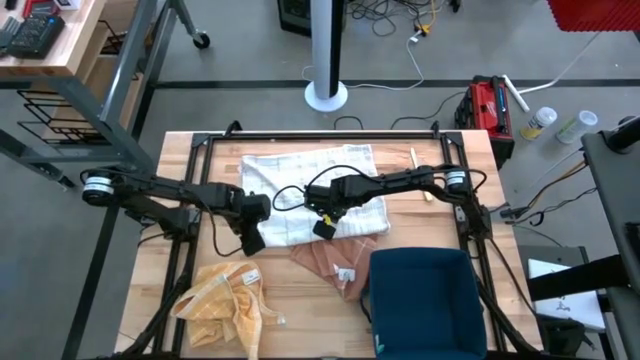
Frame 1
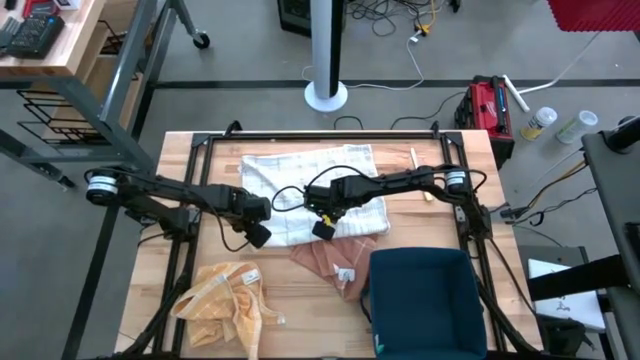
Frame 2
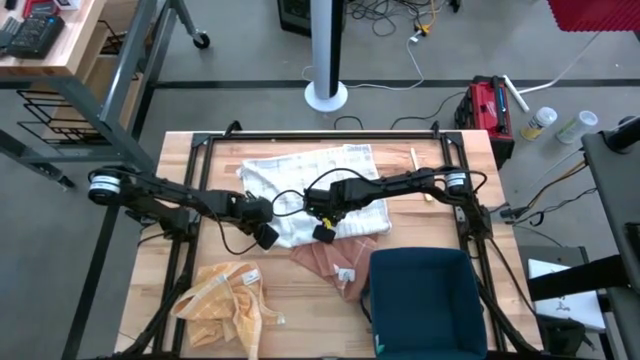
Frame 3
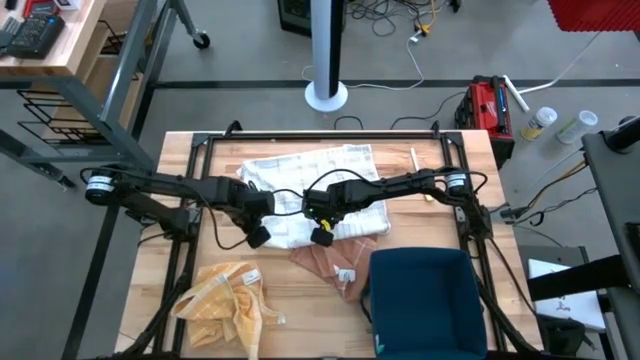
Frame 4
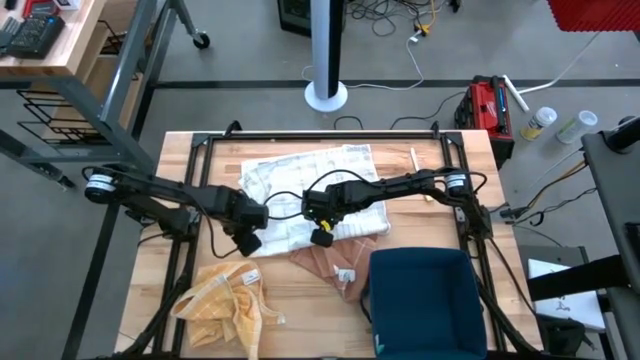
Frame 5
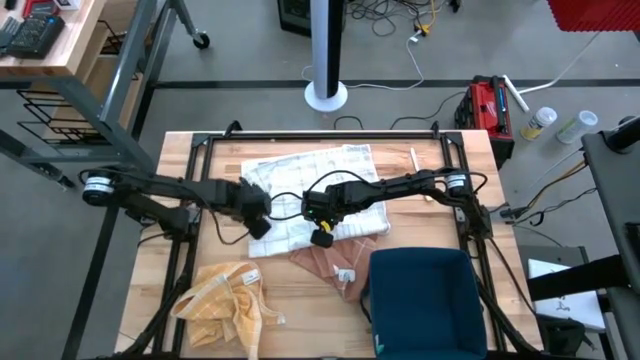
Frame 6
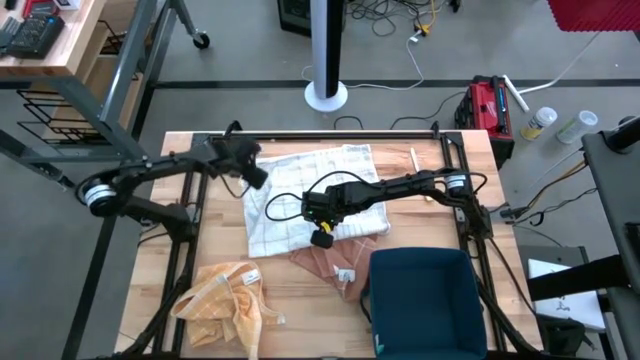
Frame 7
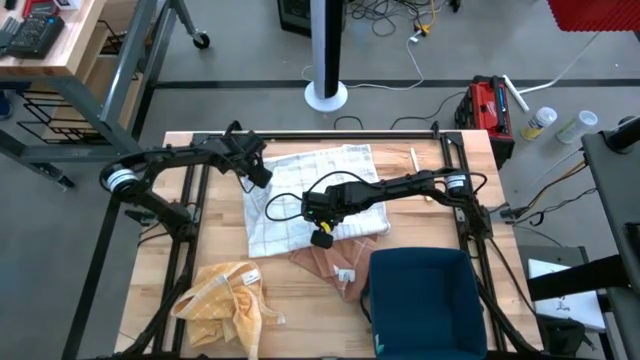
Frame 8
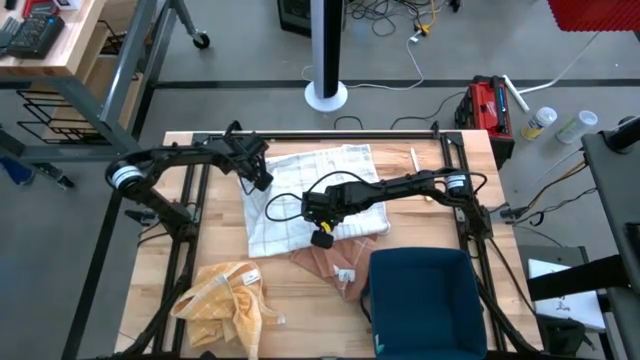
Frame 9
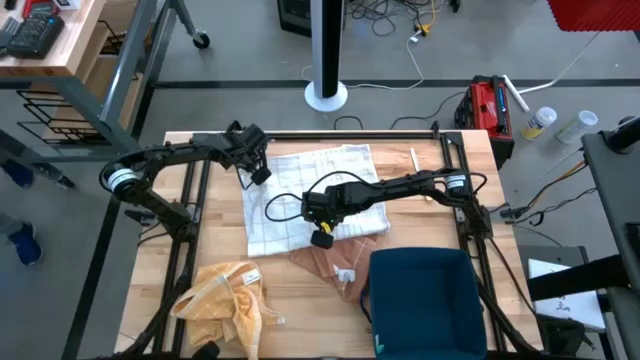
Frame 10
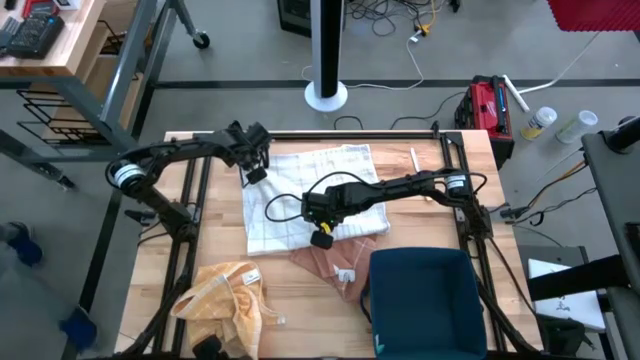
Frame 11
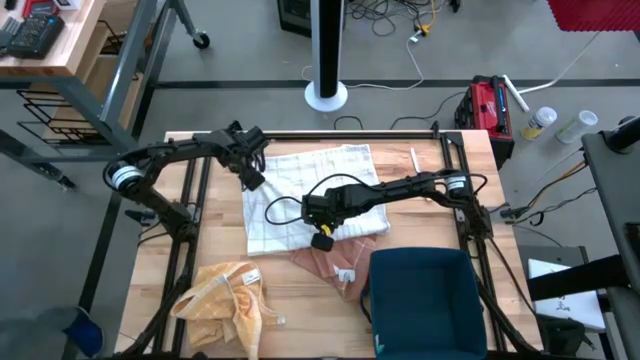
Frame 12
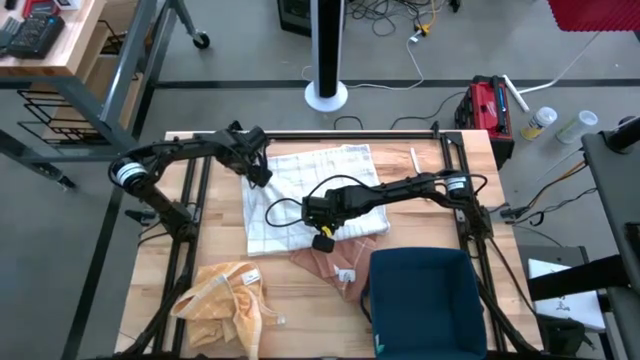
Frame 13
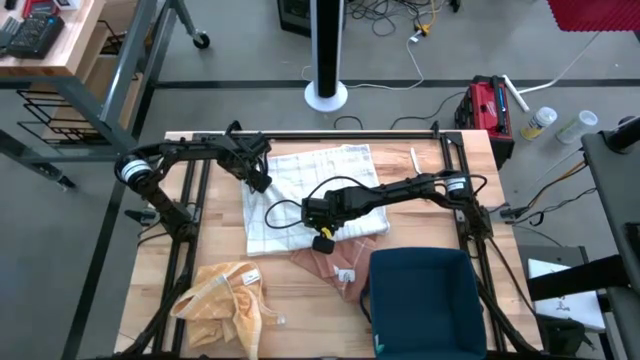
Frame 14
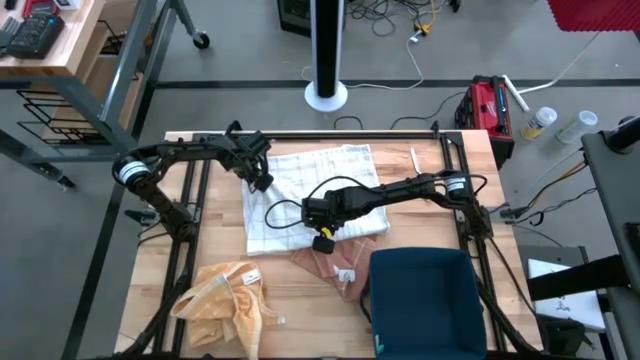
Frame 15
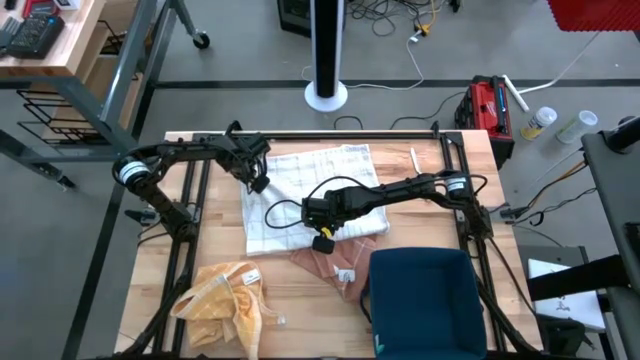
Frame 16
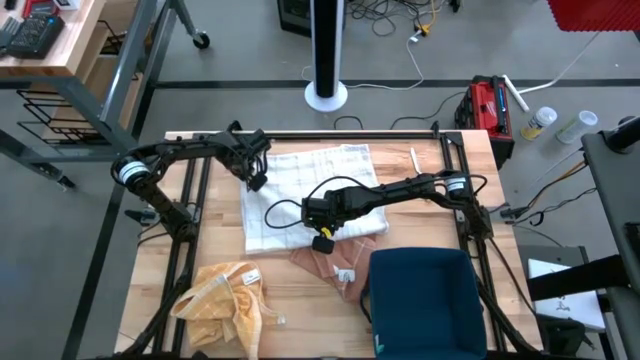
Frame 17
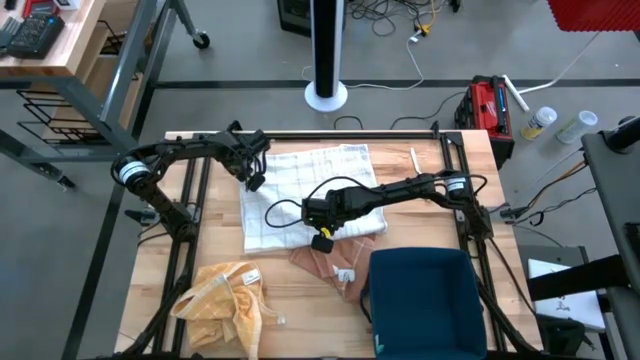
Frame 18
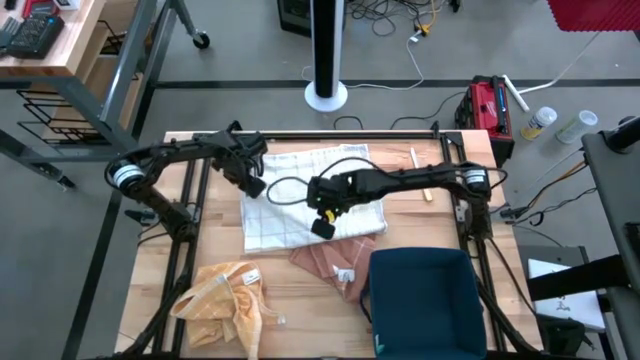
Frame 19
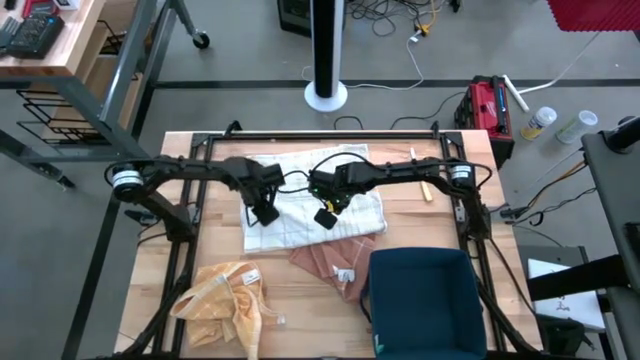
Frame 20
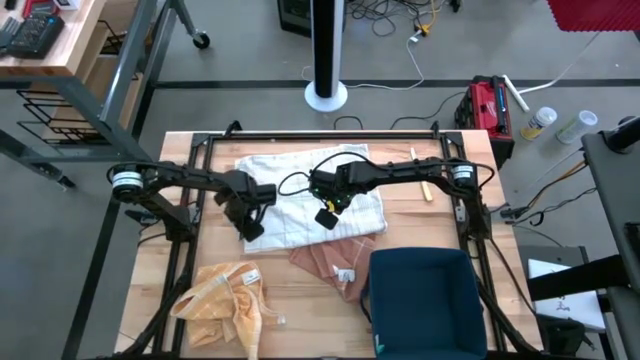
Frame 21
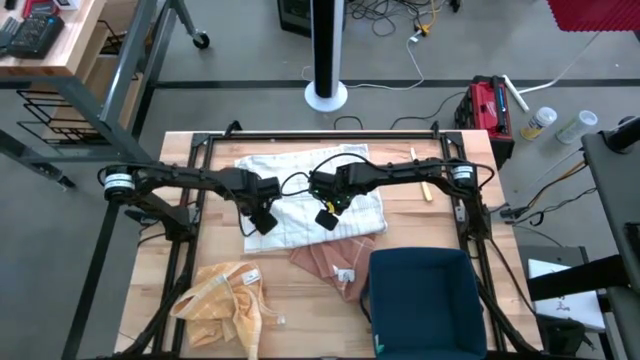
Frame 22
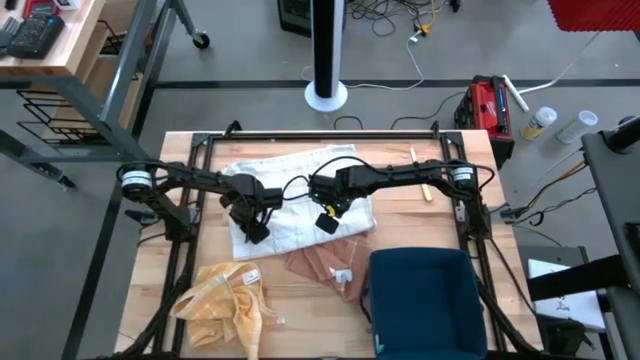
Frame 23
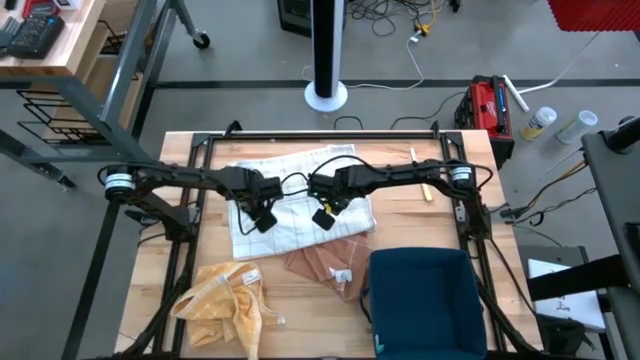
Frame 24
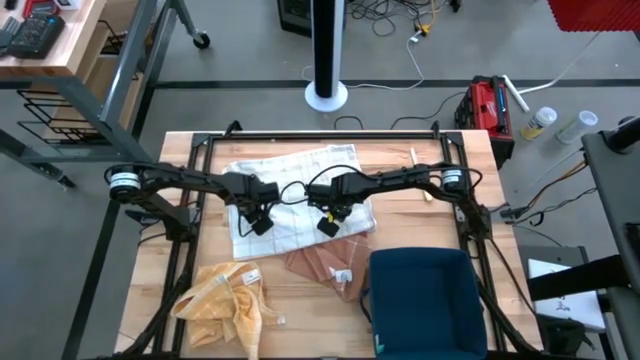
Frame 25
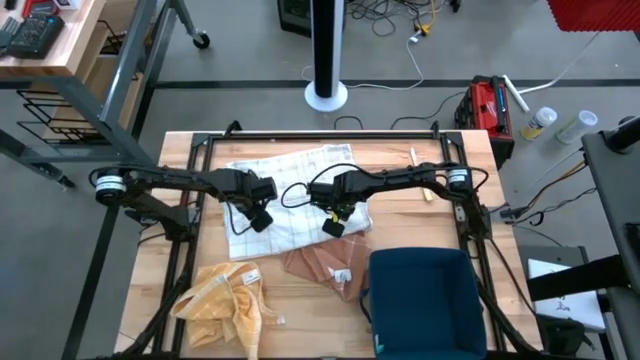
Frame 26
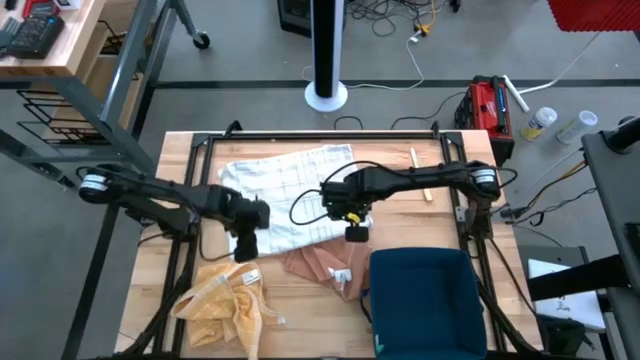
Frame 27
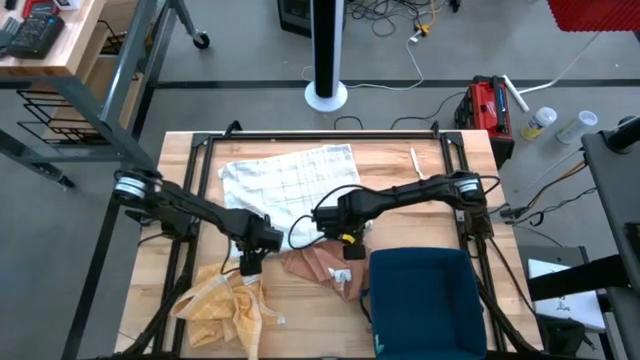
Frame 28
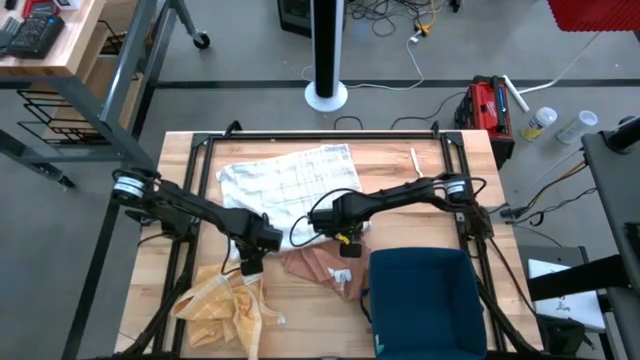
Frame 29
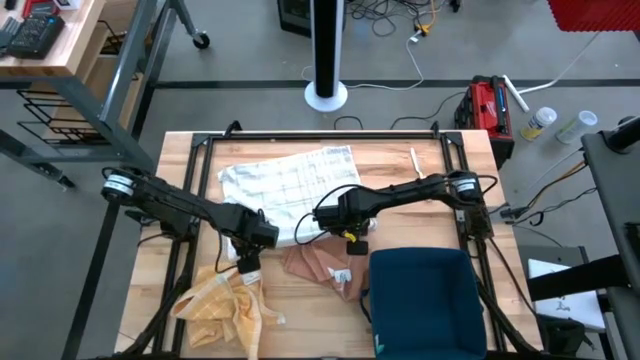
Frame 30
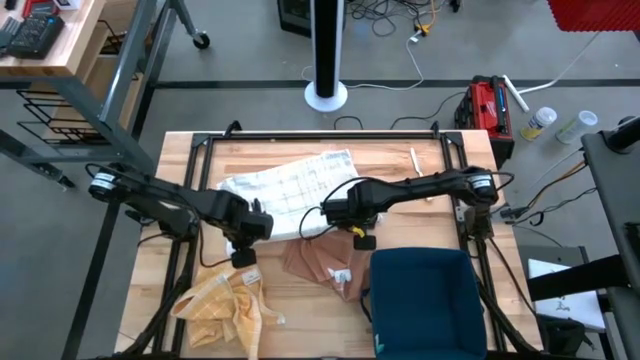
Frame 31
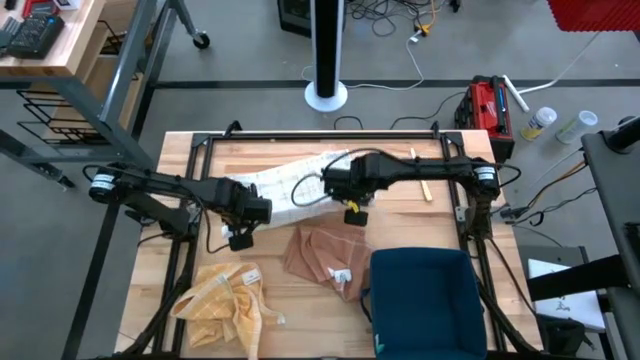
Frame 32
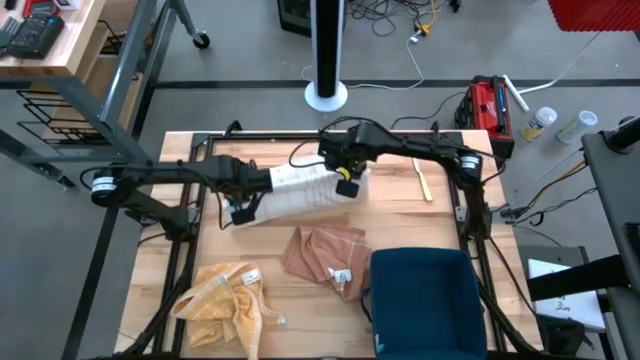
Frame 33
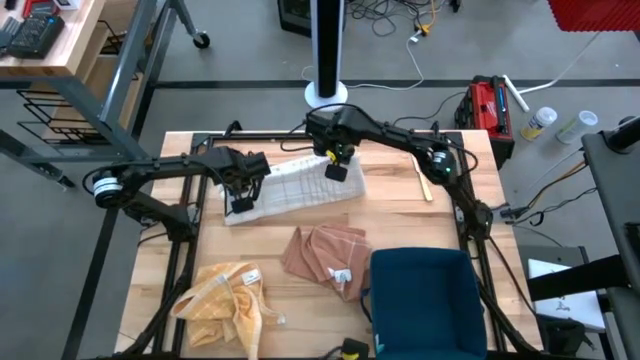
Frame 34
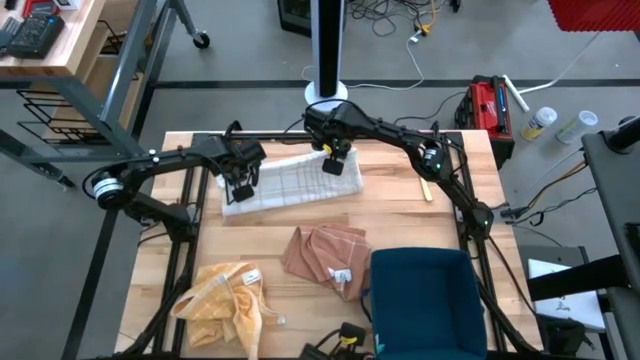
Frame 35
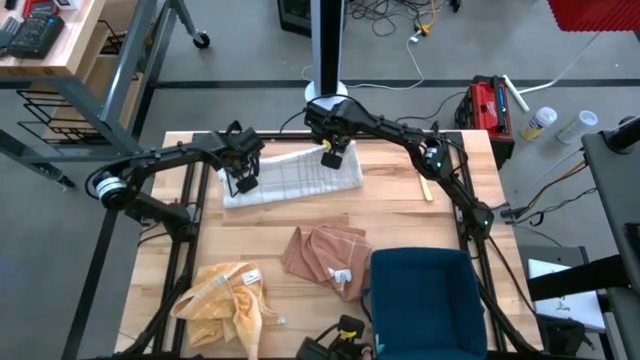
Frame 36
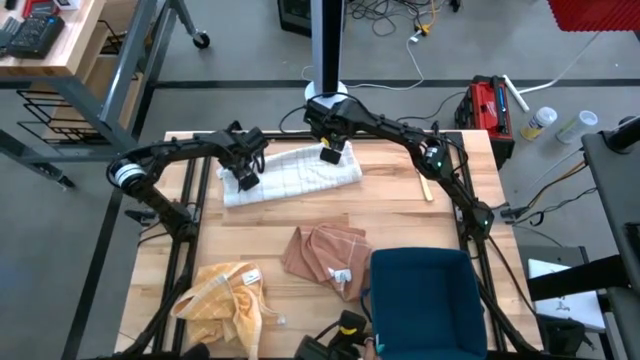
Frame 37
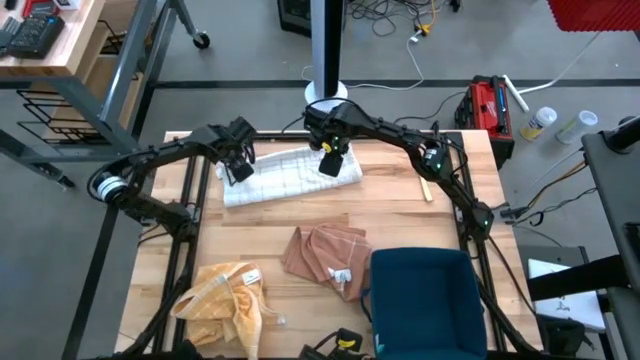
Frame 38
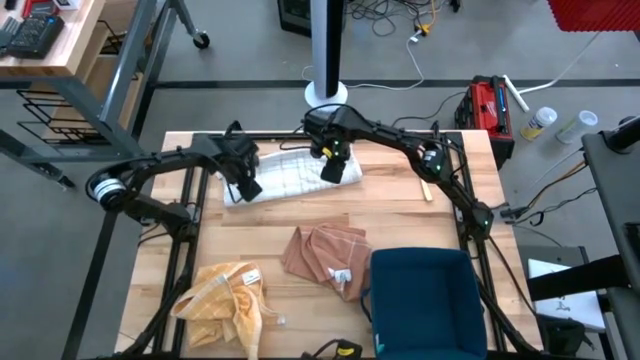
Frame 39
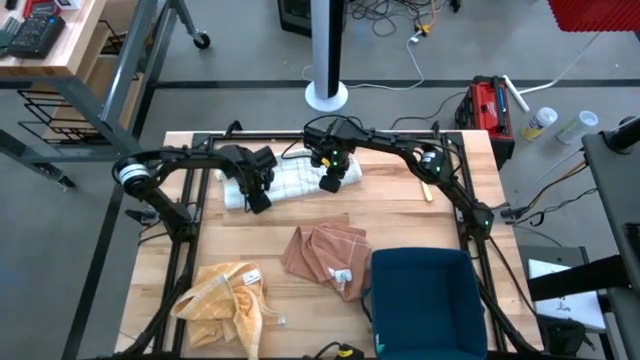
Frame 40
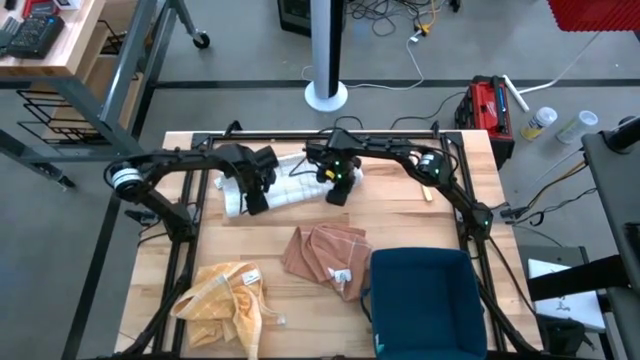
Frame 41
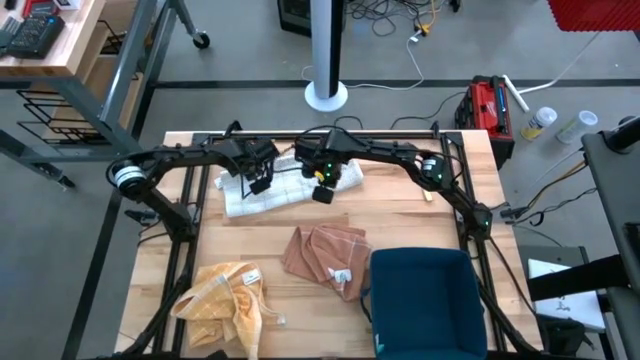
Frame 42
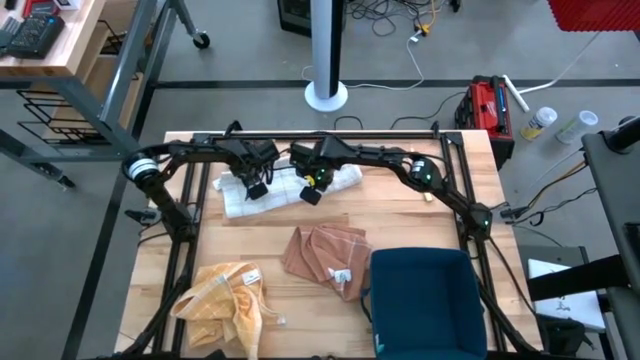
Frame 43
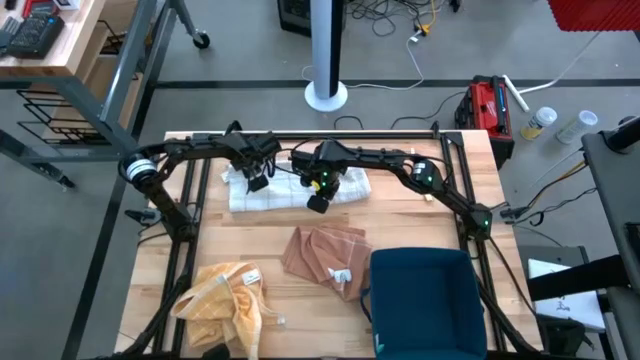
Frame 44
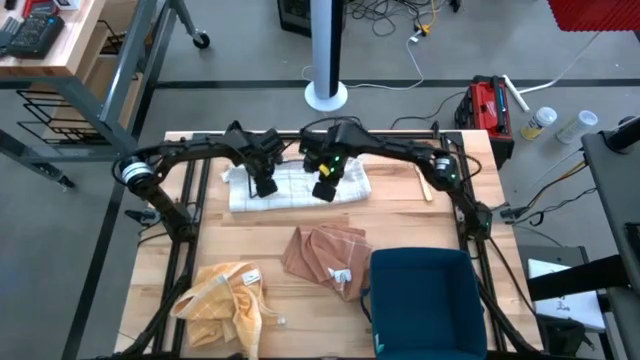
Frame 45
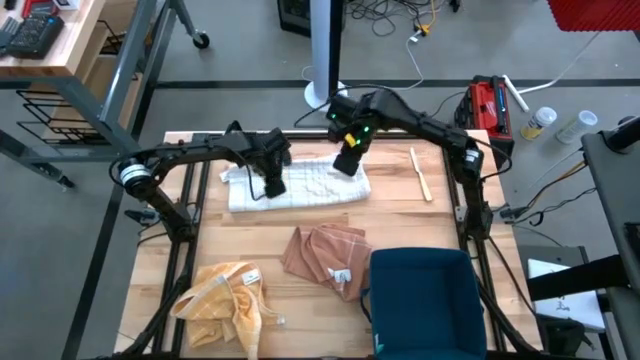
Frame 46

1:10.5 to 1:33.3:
Task: Fold towel
Fold the white towel
